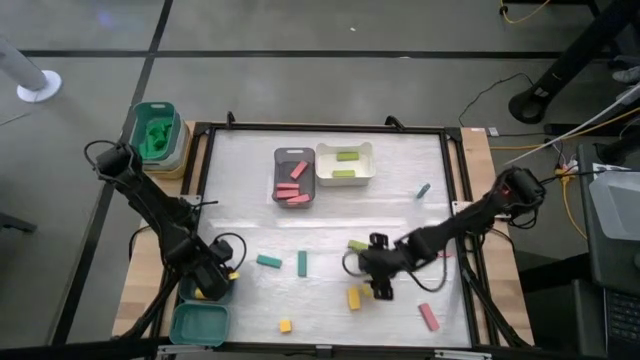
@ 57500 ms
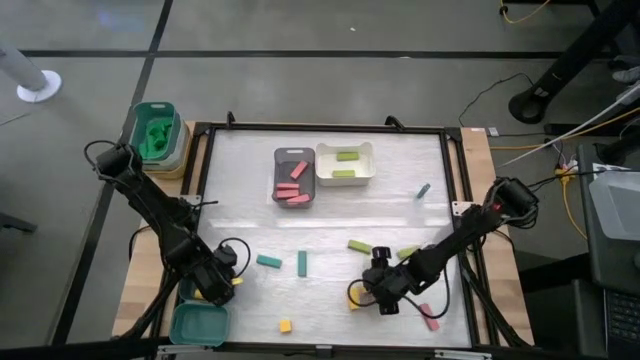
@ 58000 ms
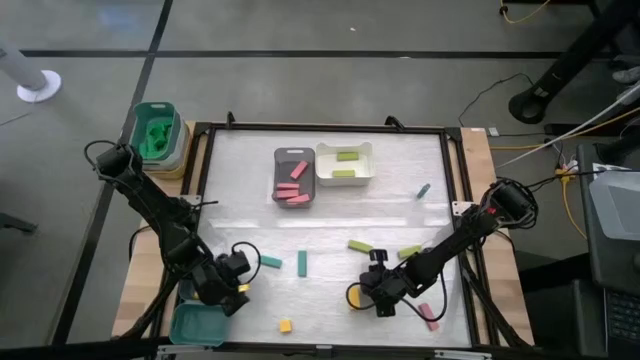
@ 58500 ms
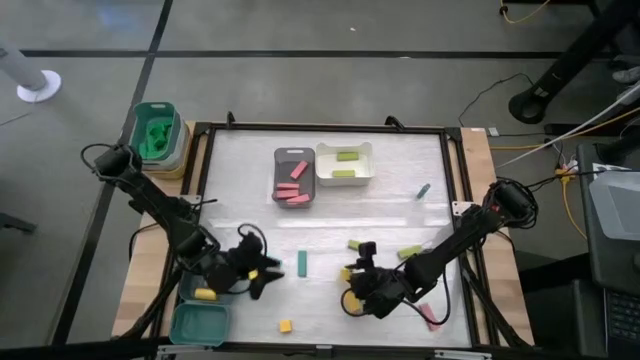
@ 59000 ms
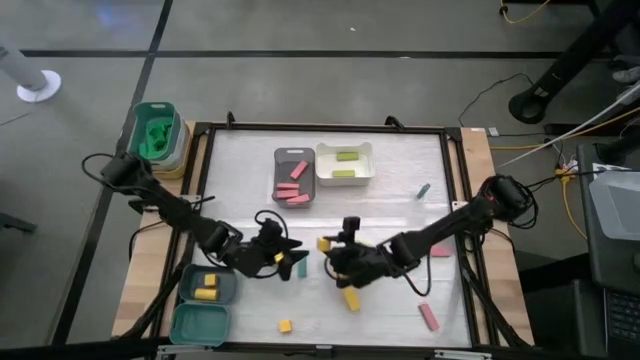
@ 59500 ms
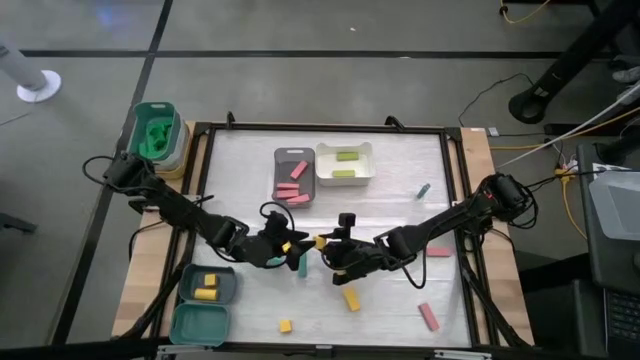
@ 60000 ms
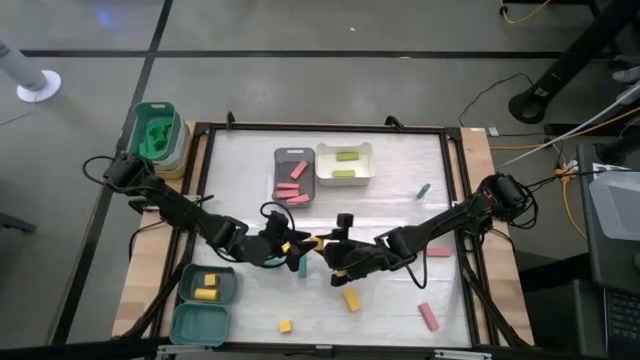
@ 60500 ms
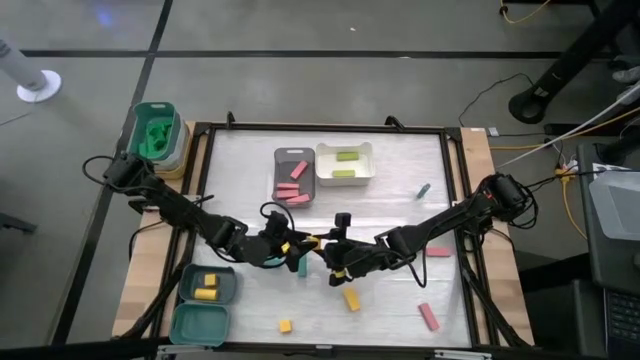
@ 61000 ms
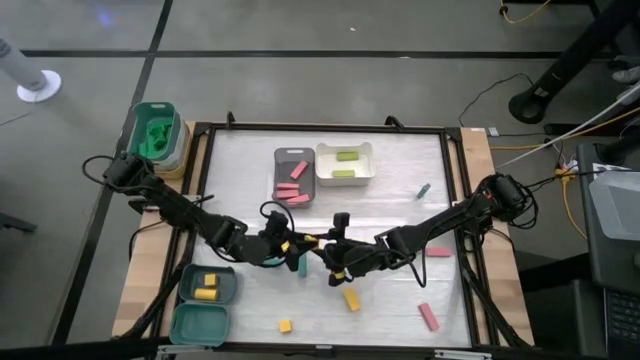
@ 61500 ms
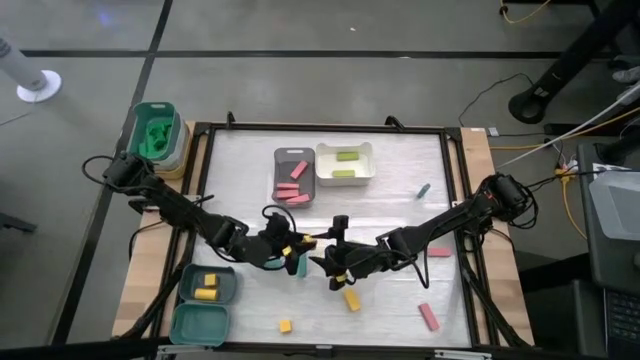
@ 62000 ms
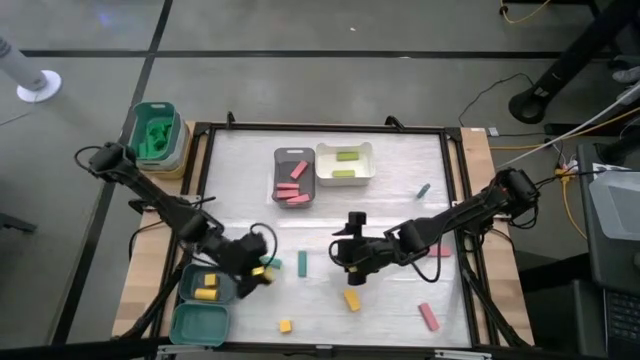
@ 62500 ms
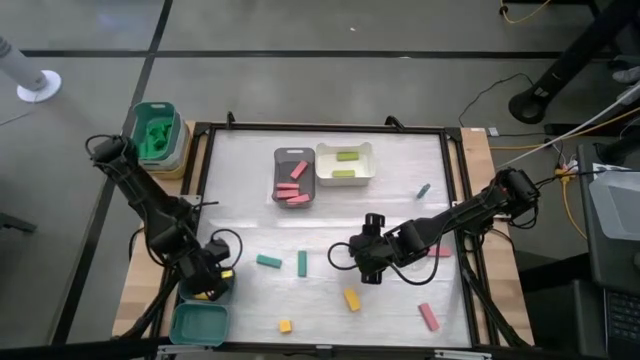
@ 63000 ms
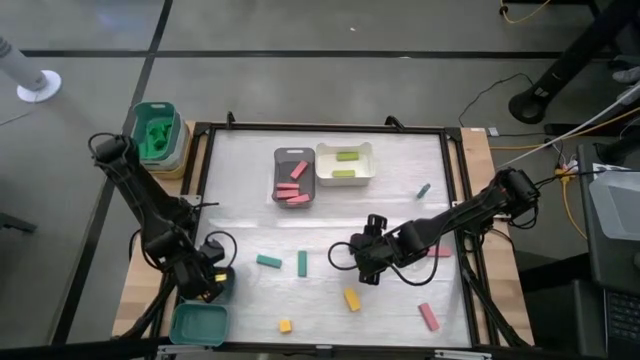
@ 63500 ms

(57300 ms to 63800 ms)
Task: Sort blocks
Put the yellow block into the blue bin

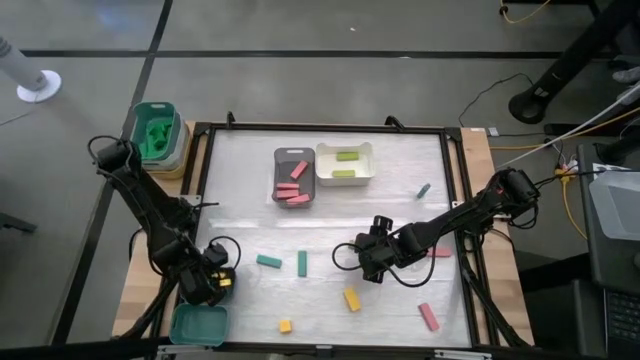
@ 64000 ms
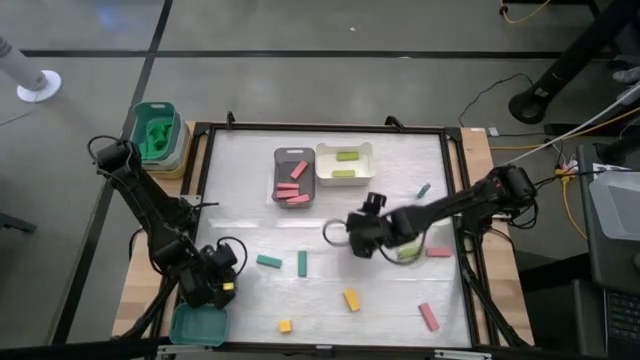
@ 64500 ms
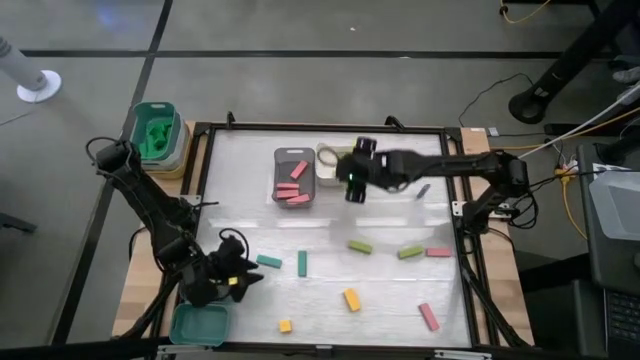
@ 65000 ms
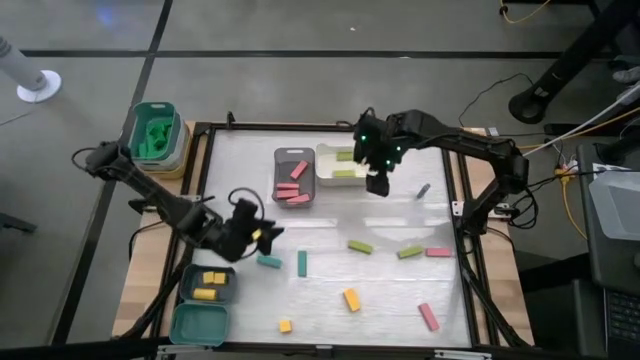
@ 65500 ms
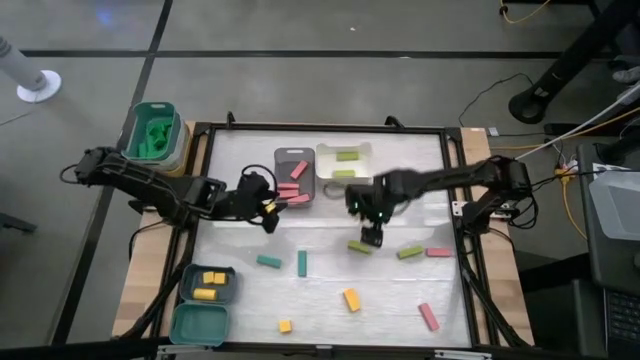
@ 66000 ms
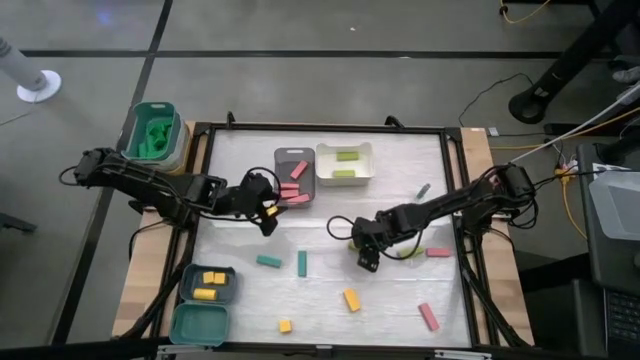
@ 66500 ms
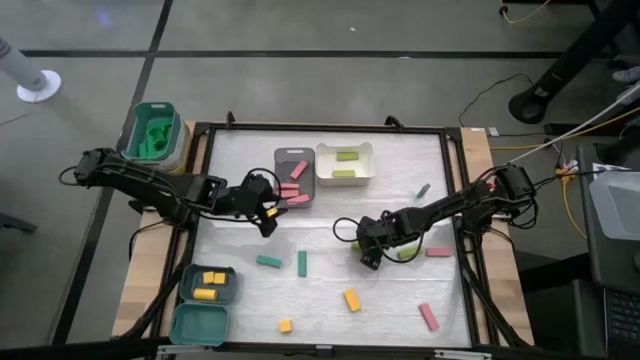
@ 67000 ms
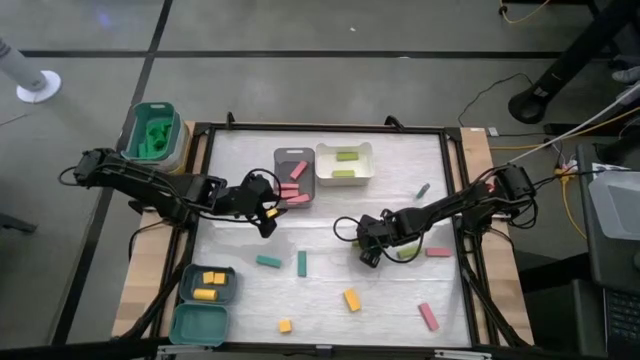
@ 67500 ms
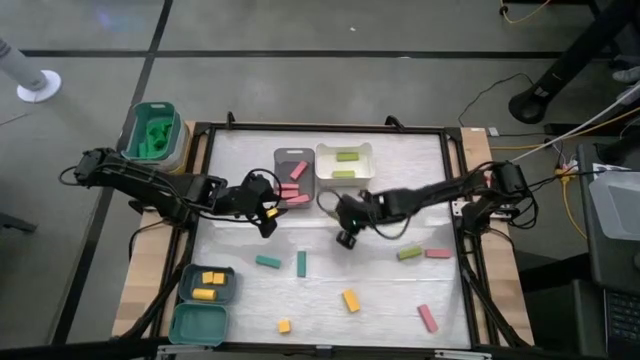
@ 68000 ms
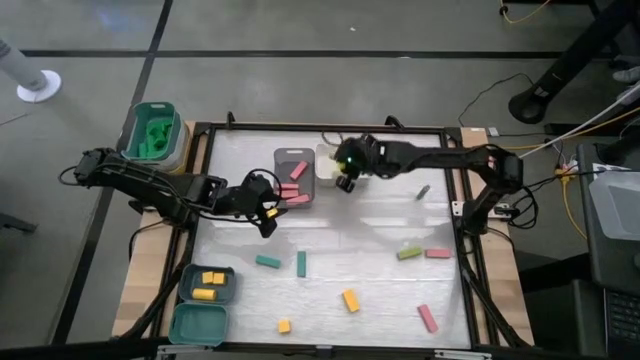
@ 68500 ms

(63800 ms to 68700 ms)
Put the green block into the white bin

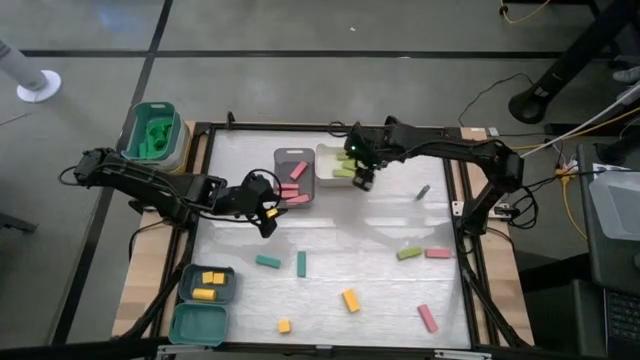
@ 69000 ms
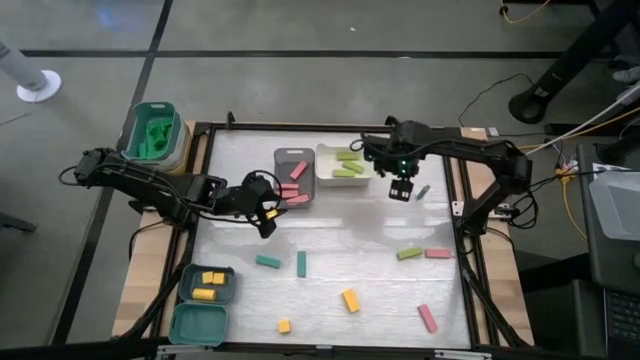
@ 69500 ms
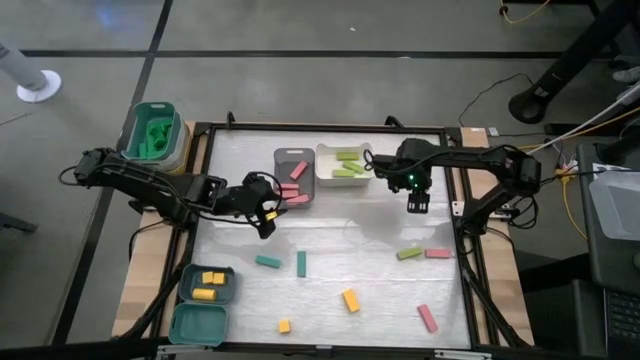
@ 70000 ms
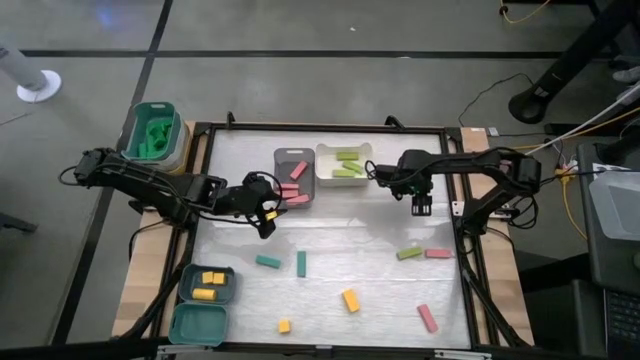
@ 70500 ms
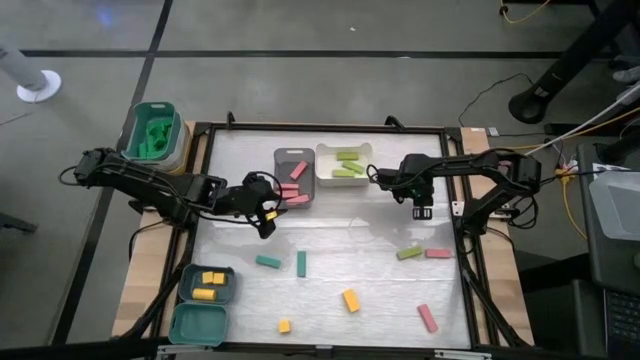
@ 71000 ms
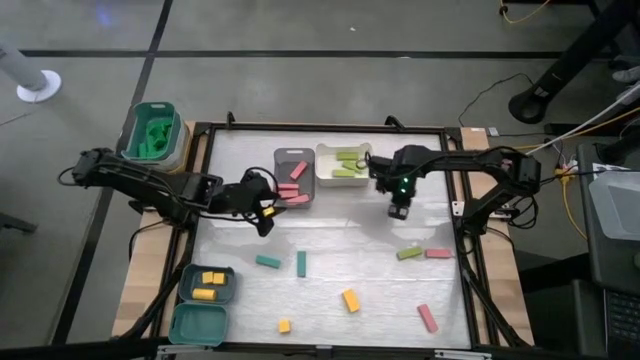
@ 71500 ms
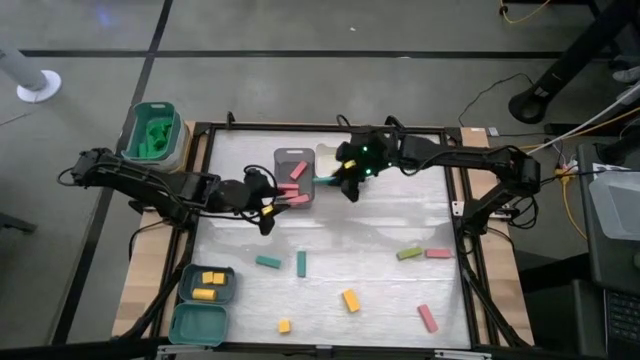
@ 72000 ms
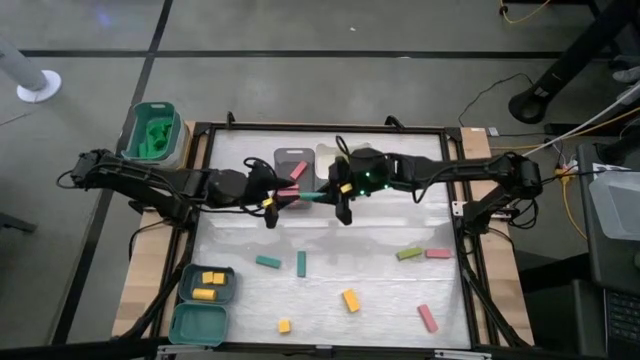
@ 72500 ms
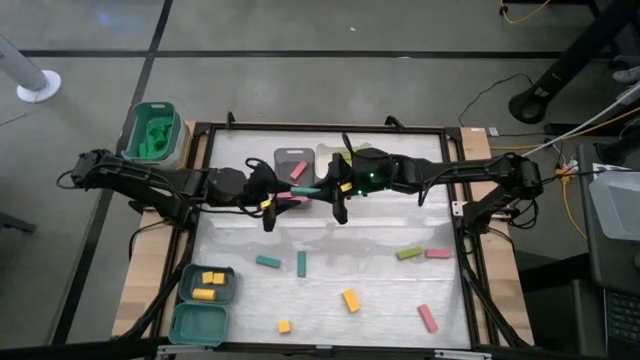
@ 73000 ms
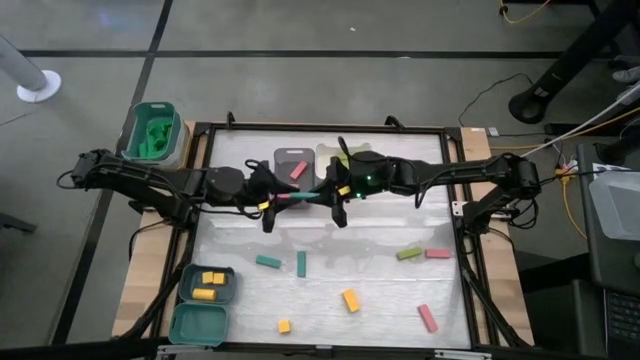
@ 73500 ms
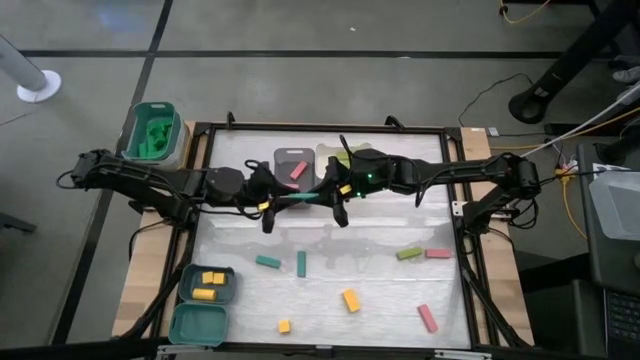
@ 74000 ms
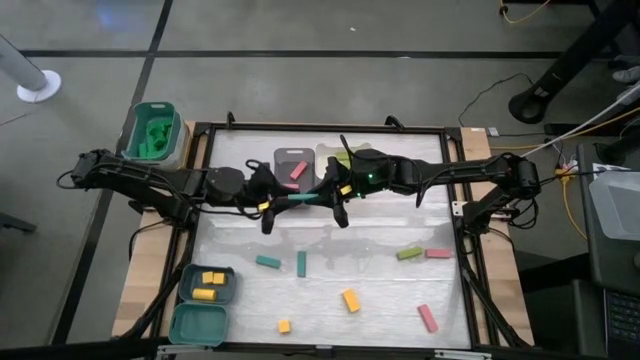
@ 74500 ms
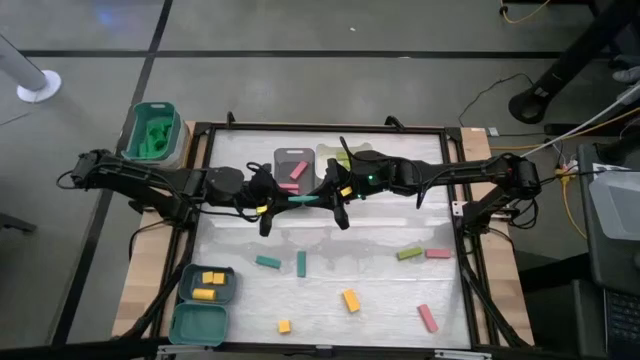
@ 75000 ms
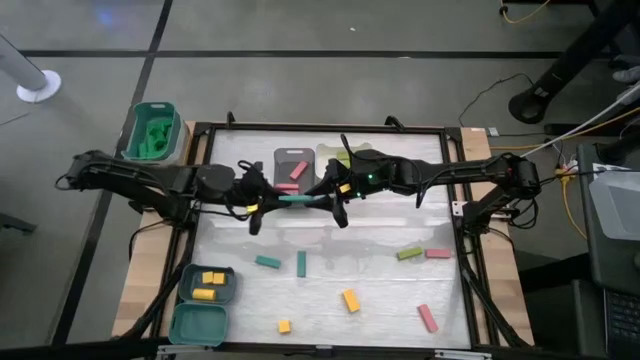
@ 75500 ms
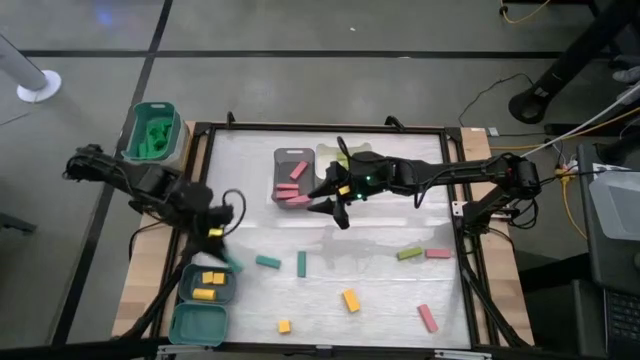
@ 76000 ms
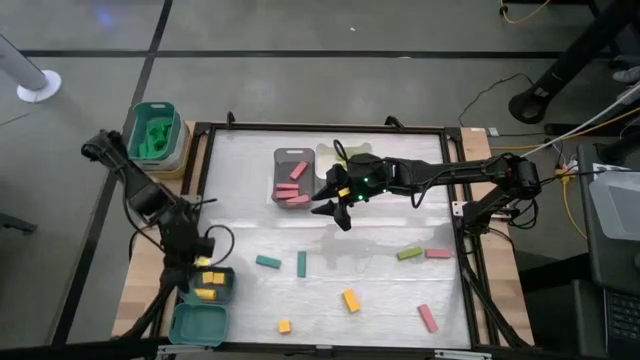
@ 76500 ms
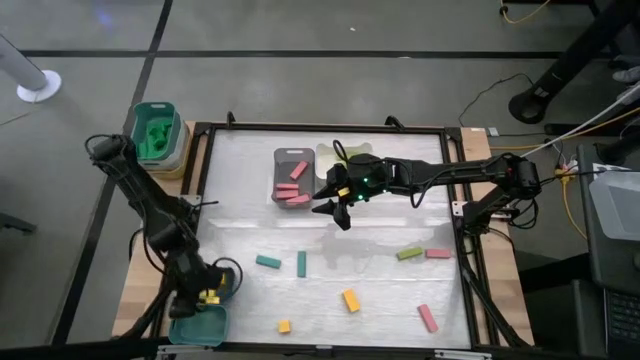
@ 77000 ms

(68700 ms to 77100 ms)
Put the light blue block into the light blue bin

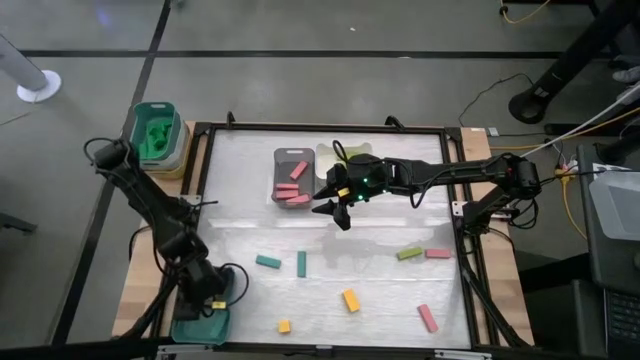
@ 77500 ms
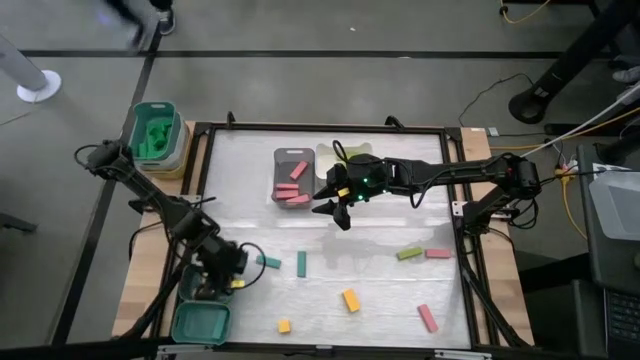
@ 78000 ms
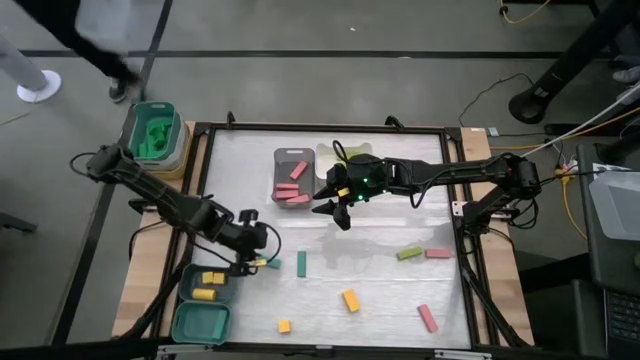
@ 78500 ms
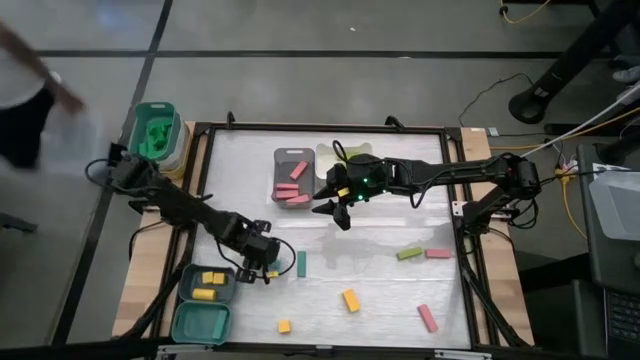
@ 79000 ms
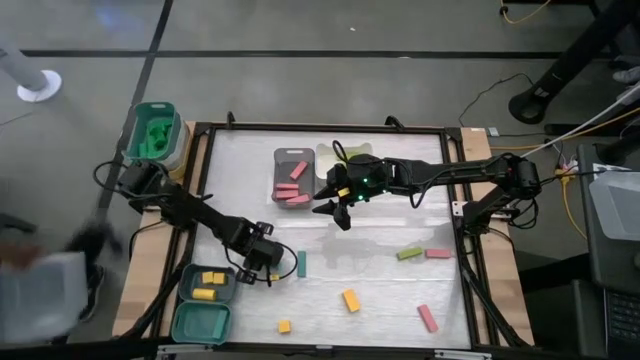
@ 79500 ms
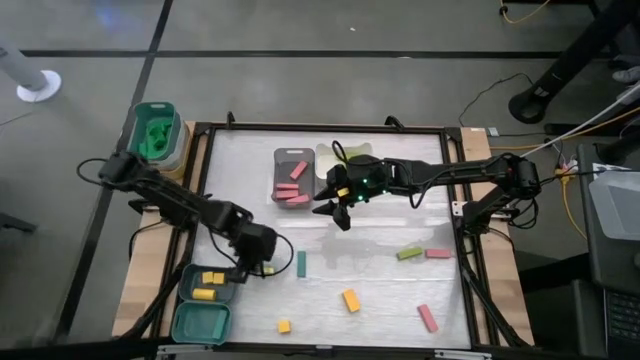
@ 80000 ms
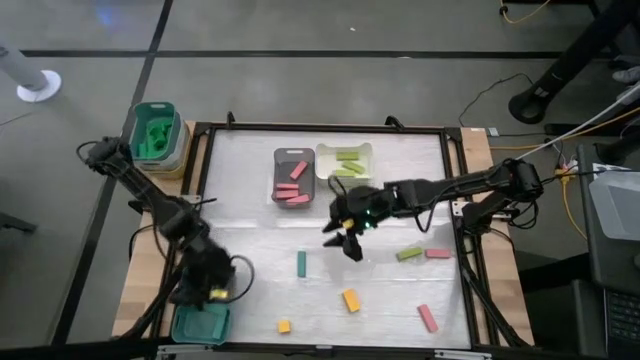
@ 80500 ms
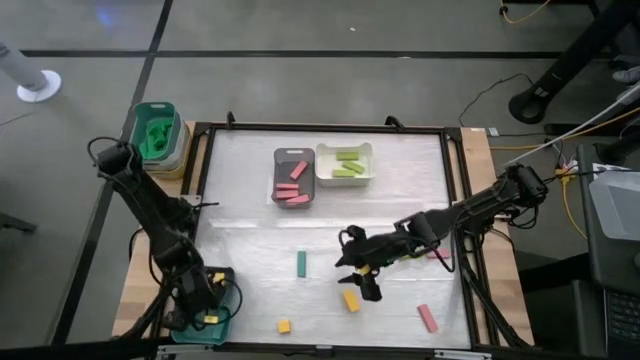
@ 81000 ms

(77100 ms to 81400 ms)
Put the light blue block into the light blue bin
